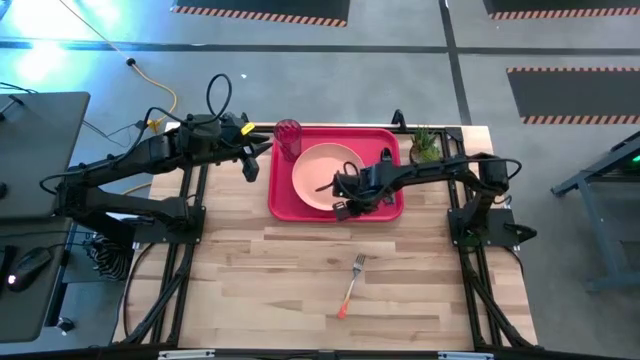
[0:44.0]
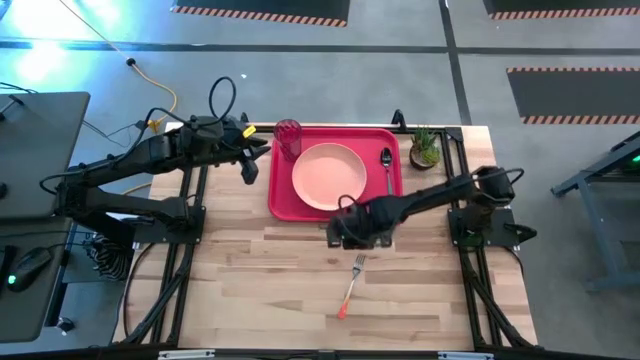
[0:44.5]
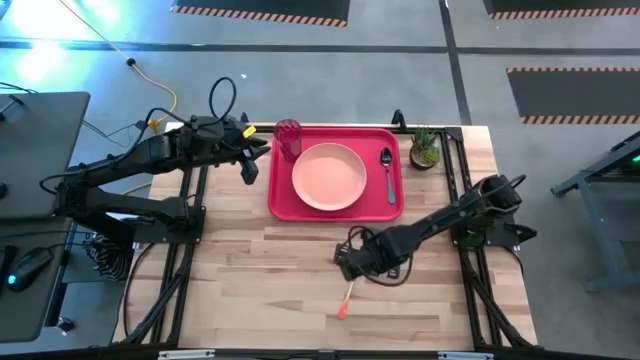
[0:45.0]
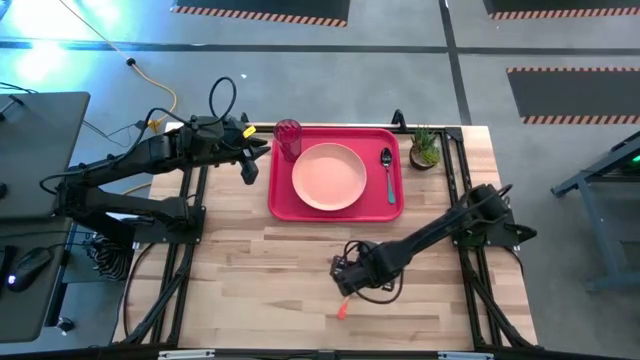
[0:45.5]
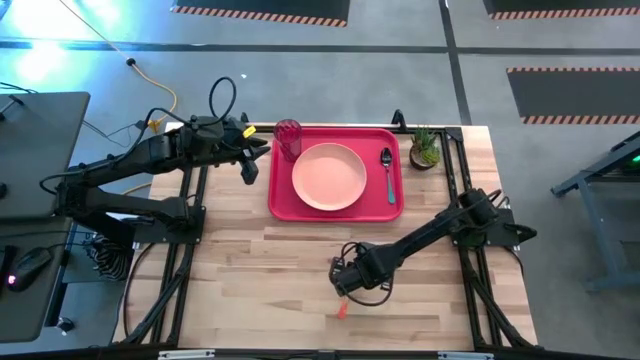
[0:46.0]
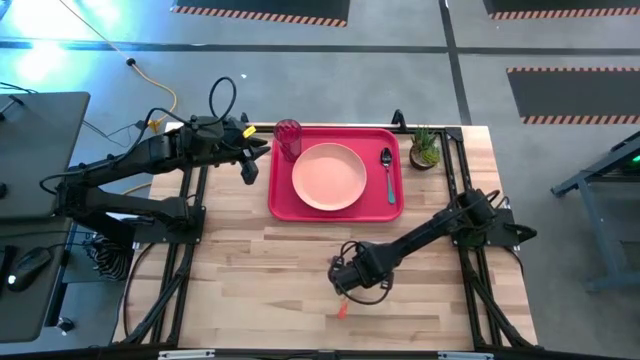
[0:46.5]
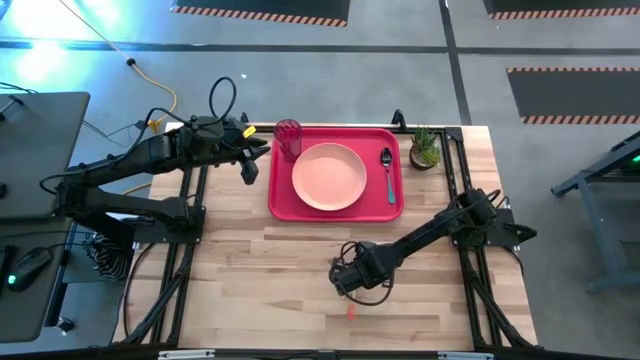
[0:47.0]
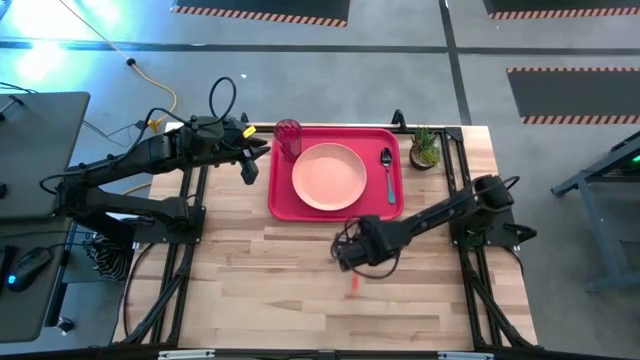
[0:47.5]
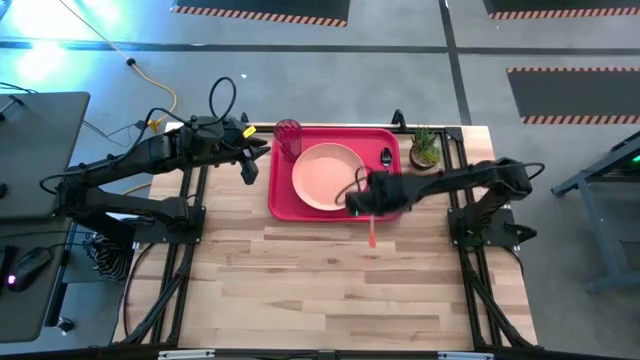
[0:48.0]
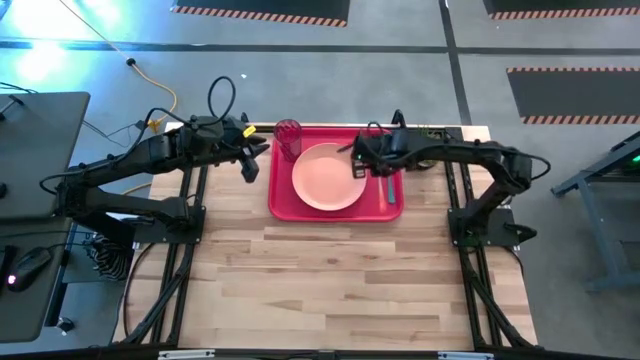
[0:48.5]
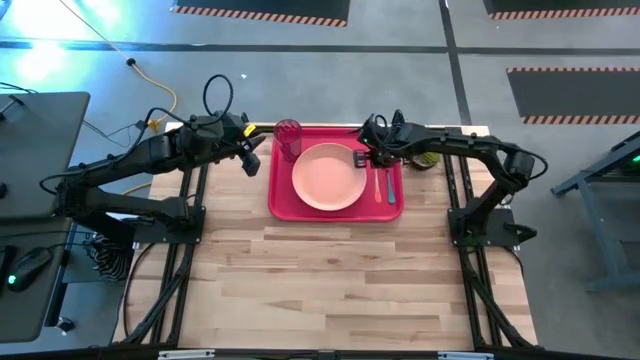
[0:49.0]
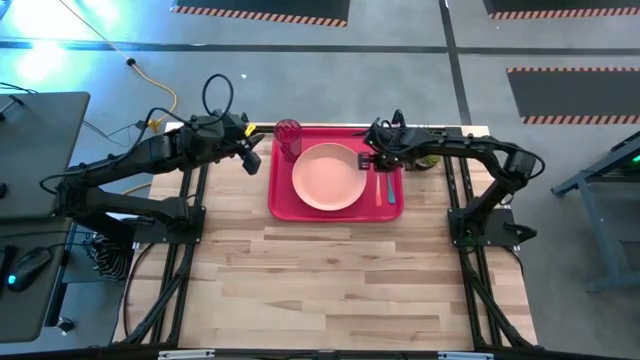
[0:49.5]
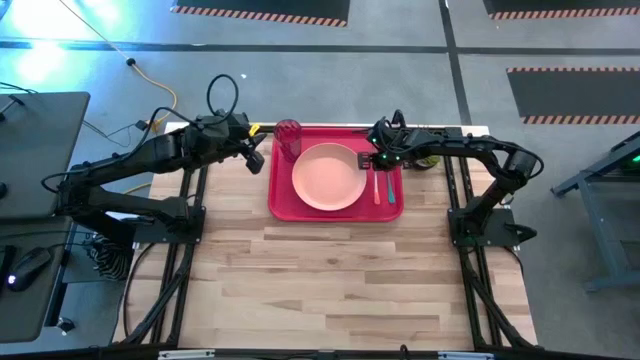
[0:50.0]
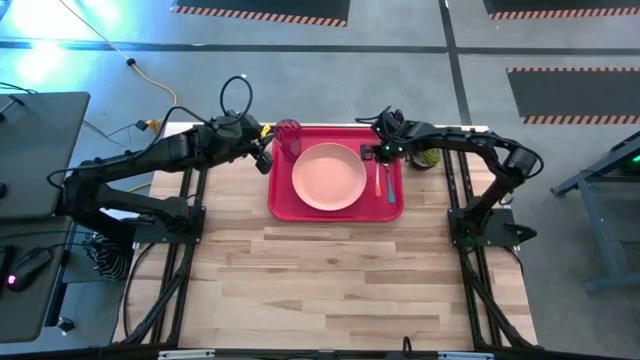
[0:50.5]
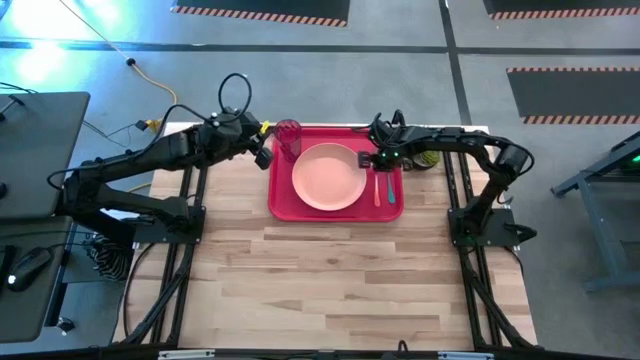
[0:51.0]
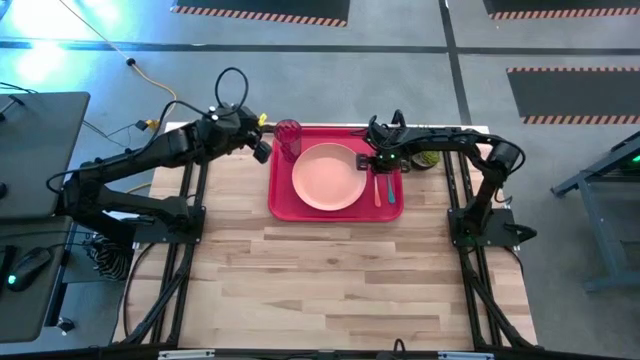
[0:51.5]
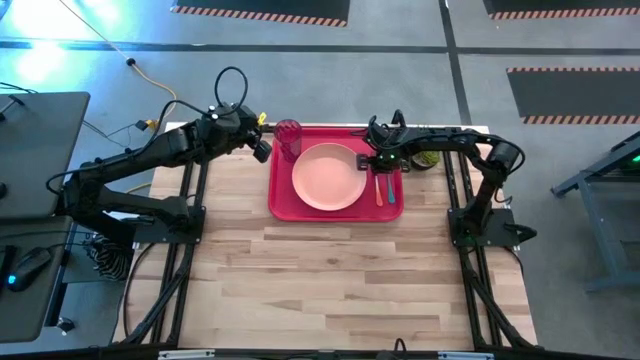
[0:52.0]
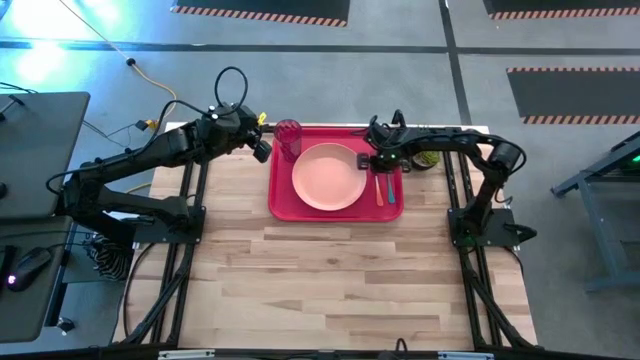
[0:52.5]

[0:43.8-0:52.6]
Task: Pick and place plate/cup/fork/spoon on tray
Put the orange fork to the right of the orange plate on the red tray

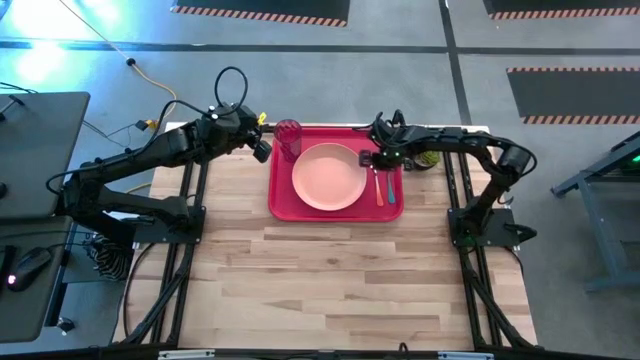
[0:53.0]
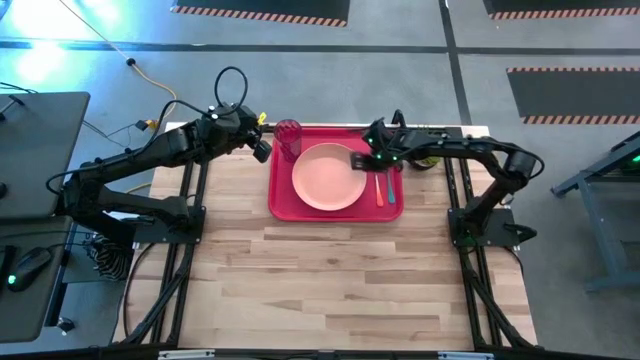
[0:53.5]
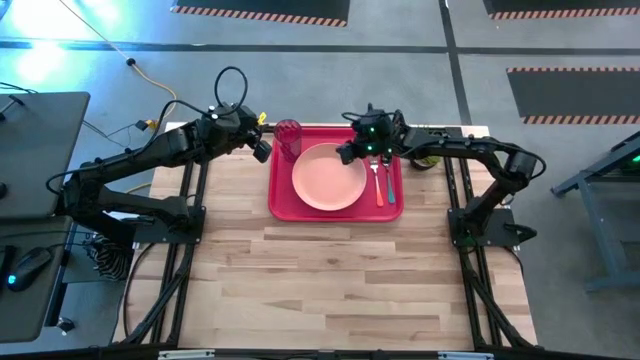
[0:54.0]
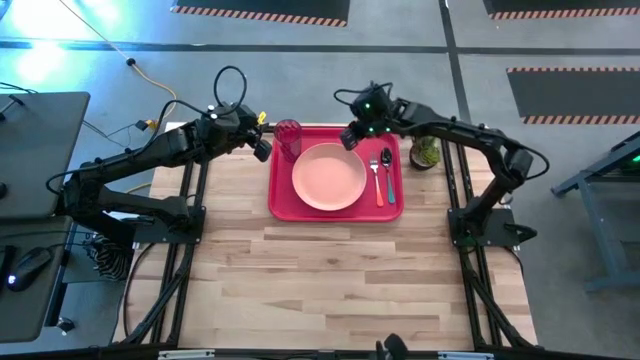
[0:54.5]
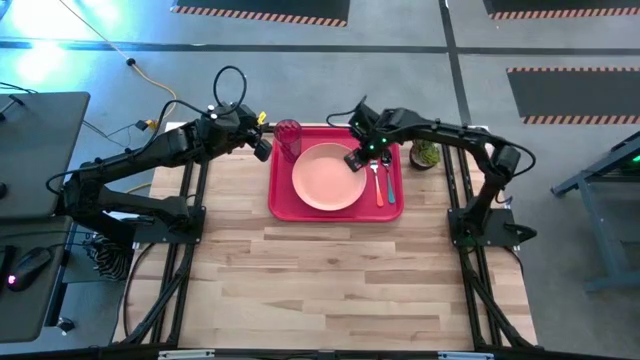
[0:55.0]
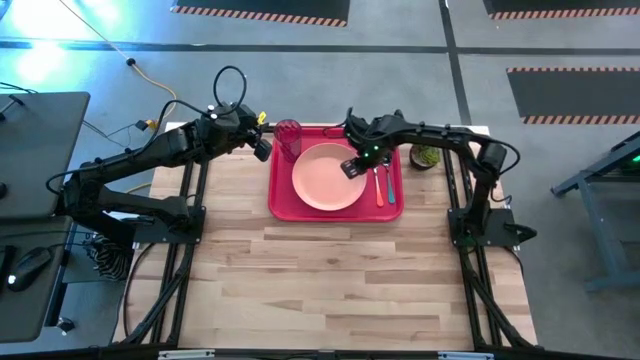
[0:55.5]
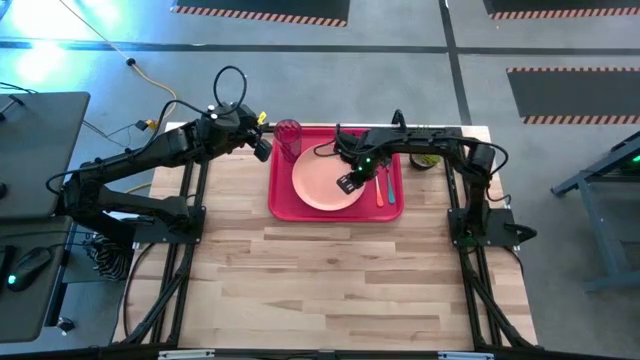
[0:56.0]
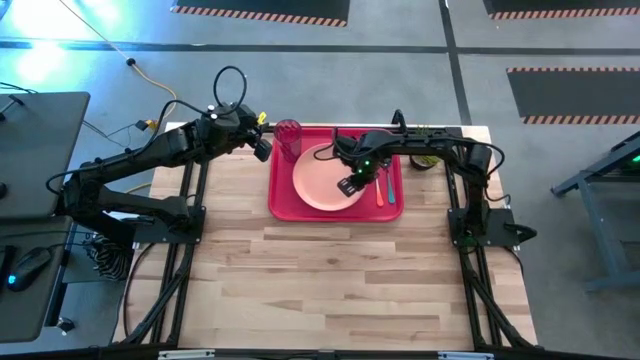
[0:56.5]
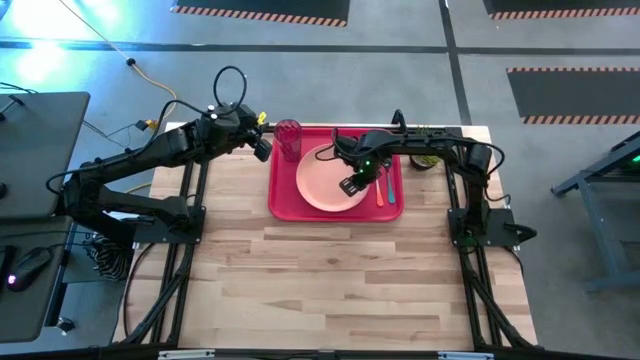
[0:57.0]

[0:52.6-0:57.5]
Adjust the orange plate on the red tray

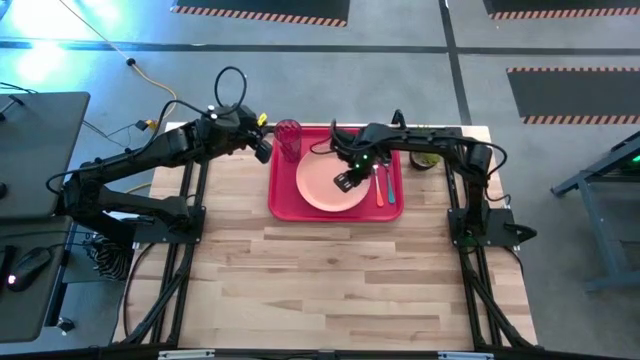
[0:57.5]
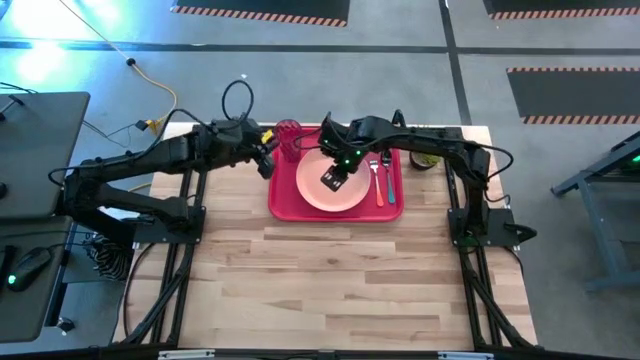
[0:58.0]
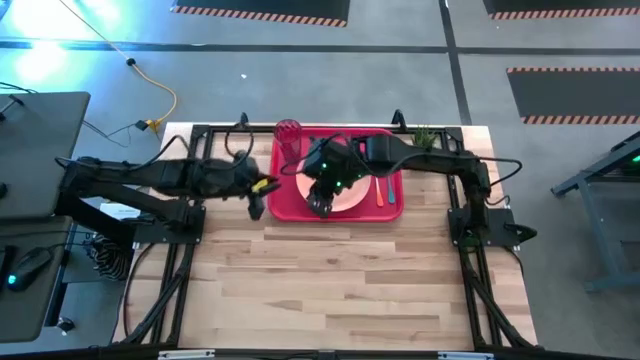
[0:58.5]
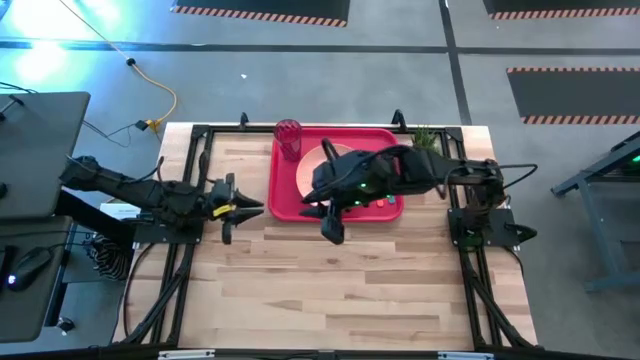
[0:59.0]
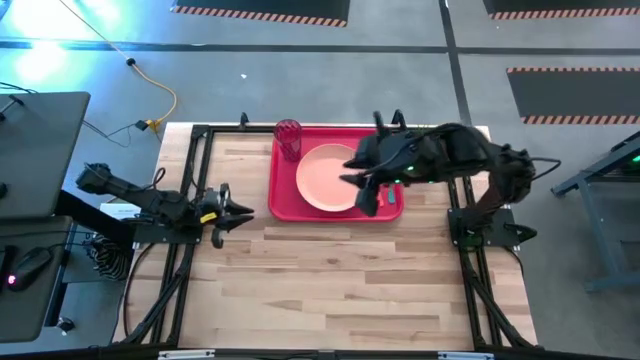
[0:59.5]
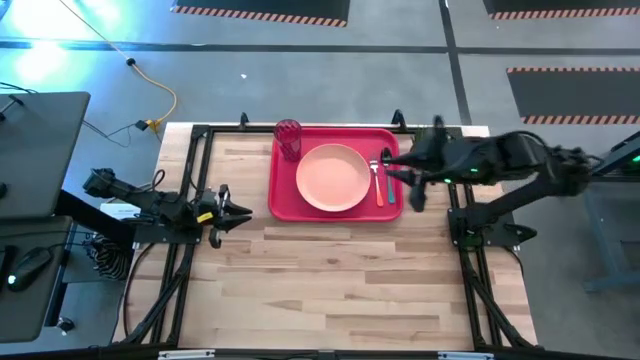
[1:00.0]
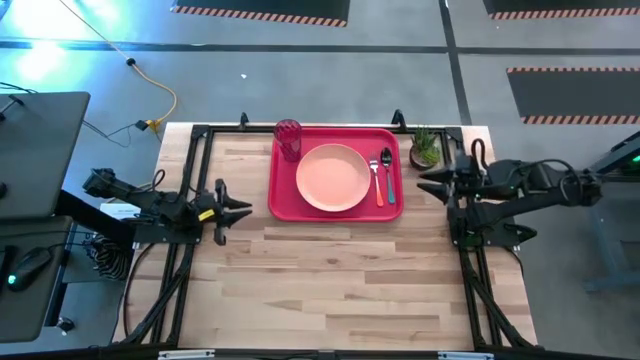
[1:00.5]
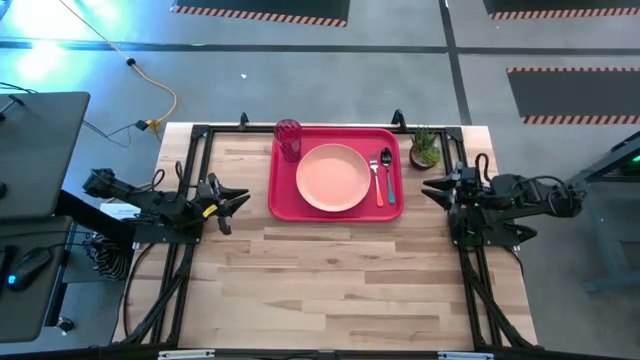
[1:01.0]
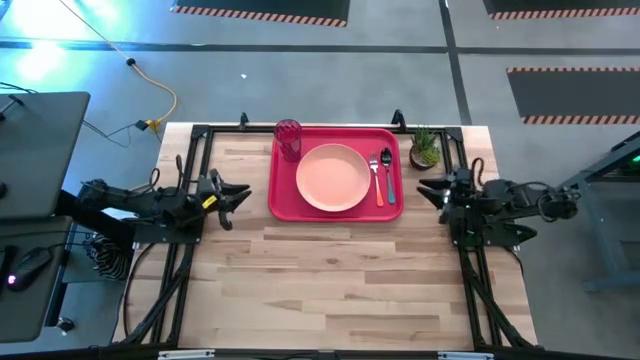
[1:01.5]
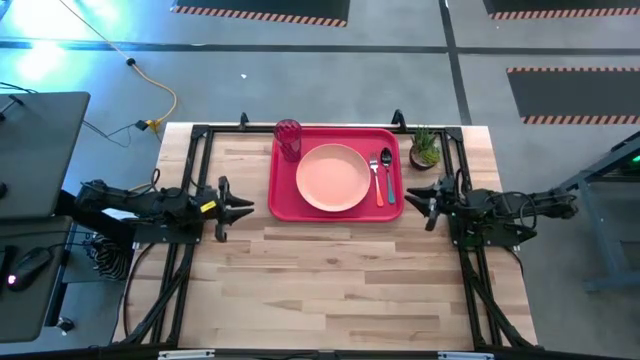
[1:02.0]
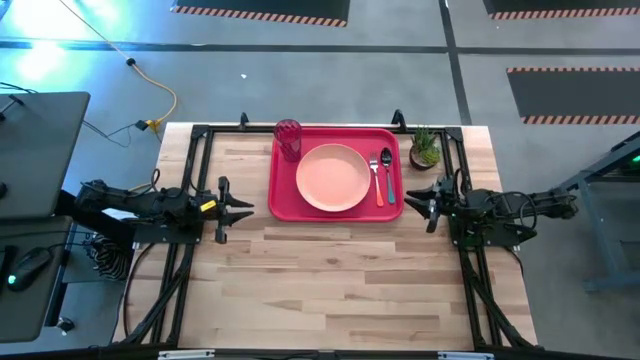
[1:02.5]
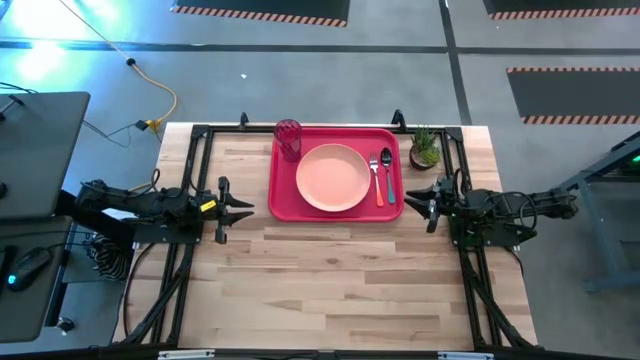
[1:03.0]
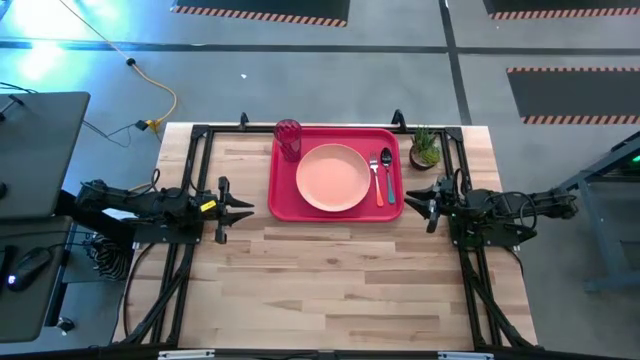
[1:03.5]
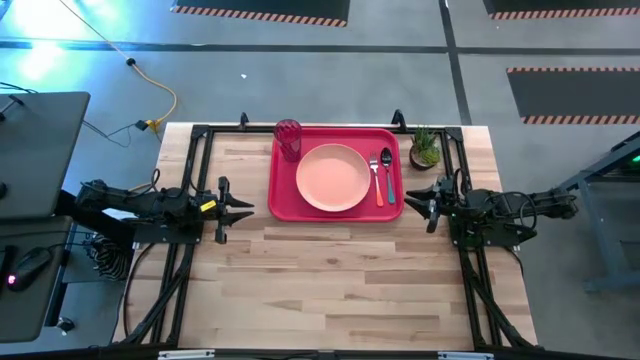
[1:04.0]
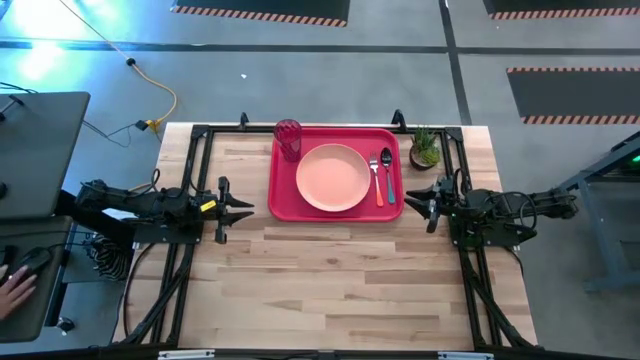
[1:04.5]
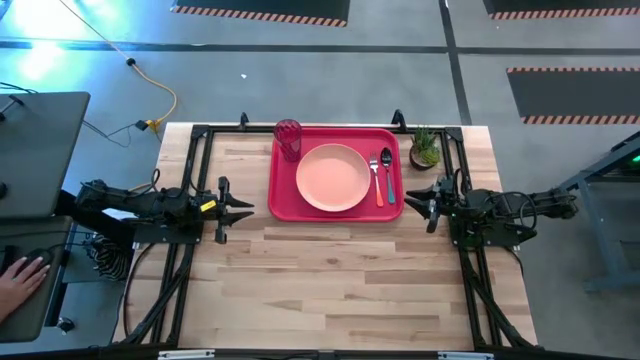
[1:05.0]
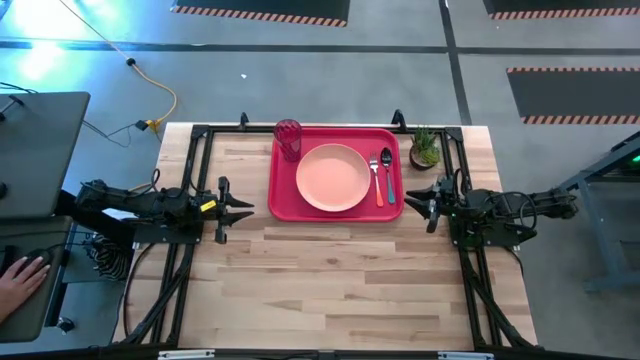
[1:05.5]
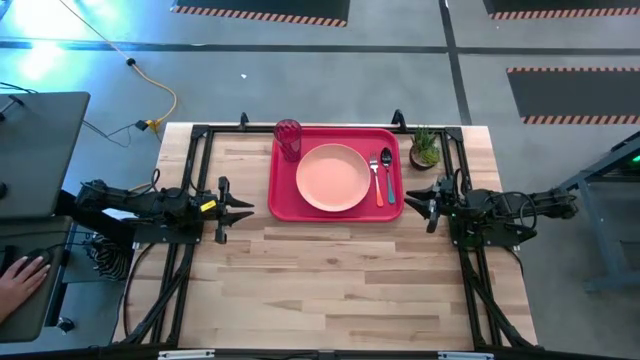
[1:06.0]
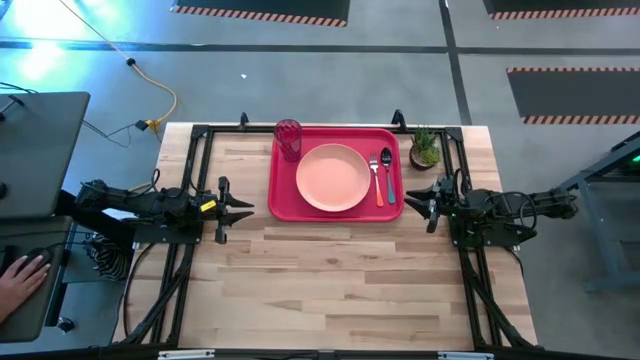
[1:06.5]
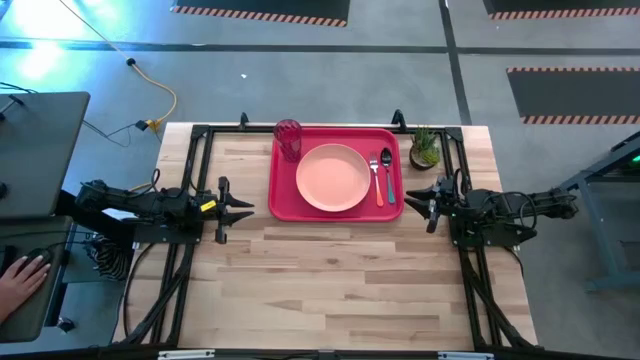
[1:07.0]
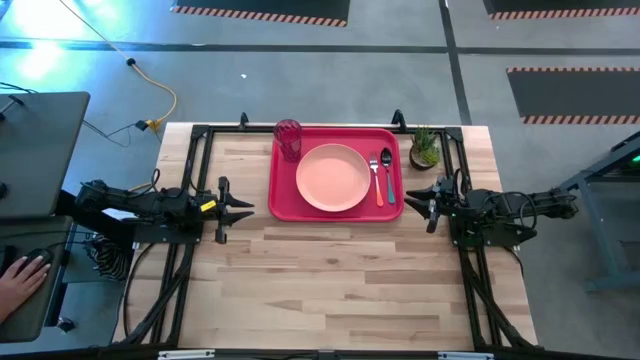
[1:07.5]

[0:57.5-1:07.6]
Return to Home Position
